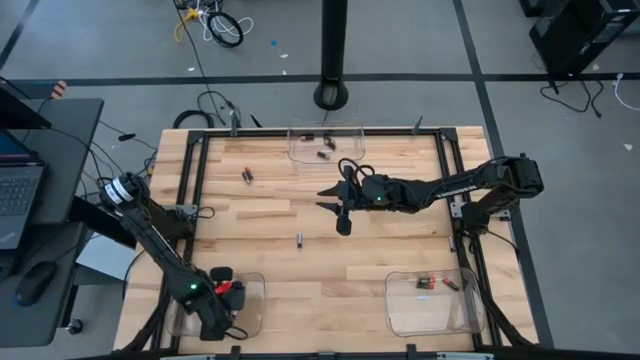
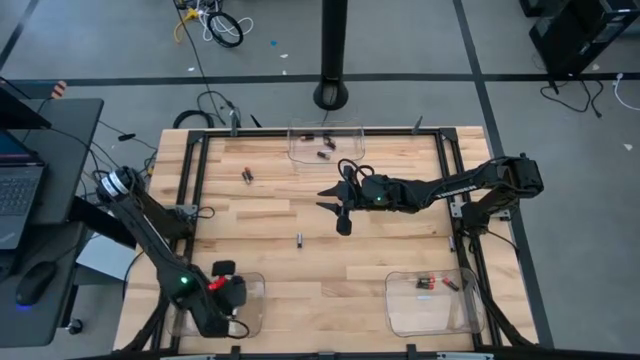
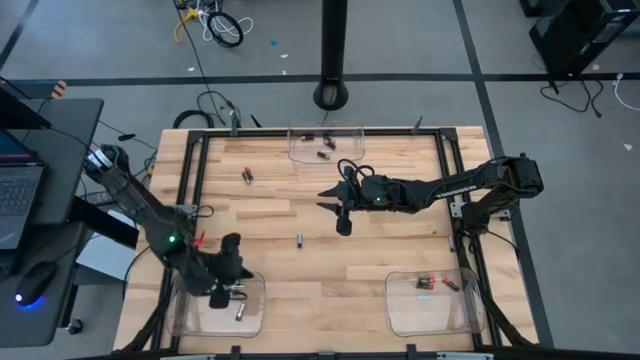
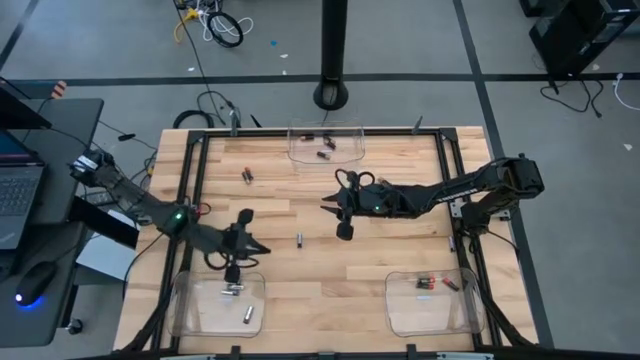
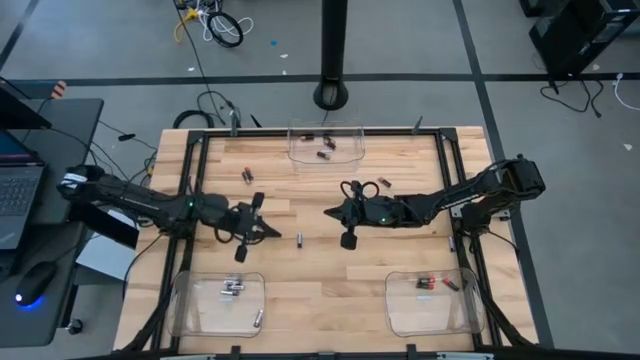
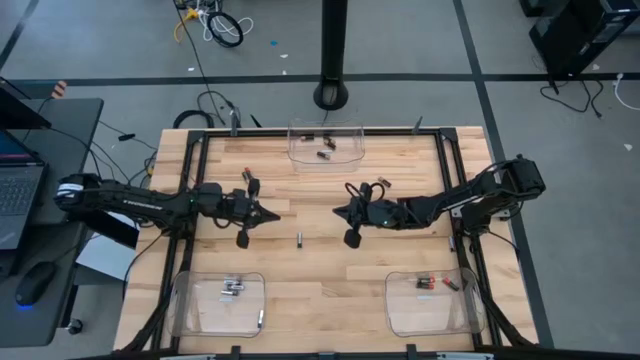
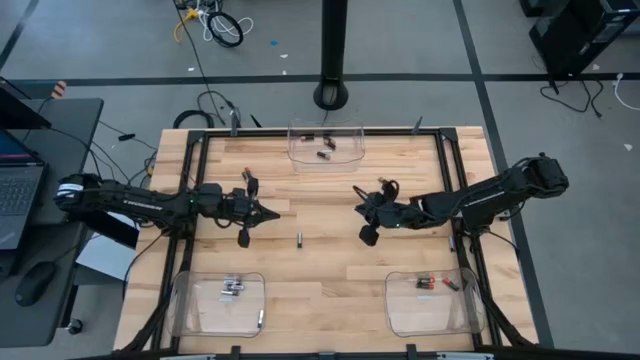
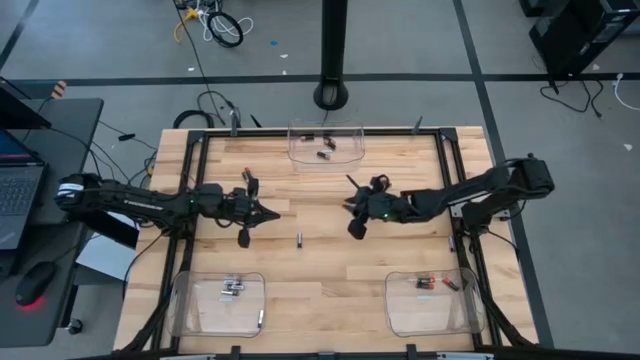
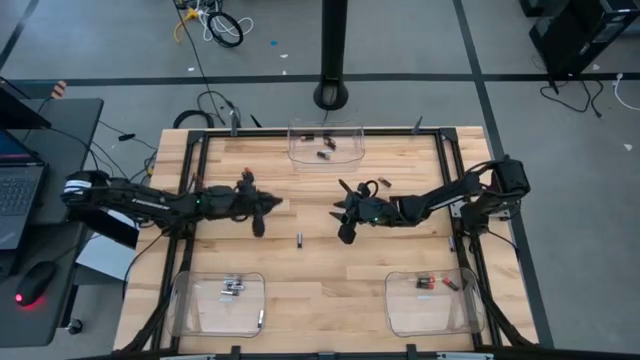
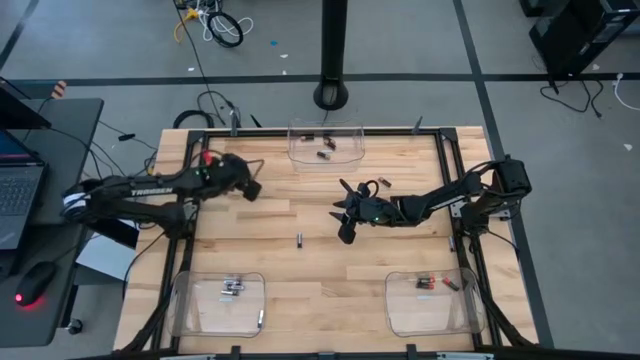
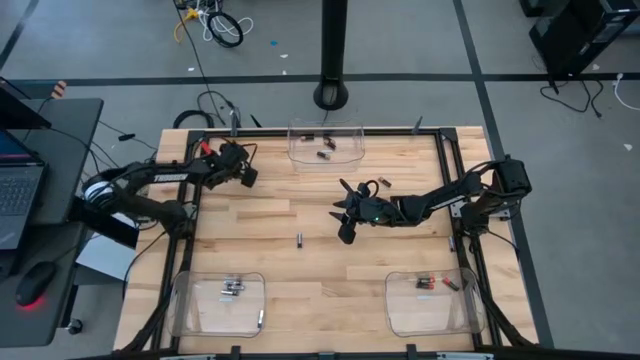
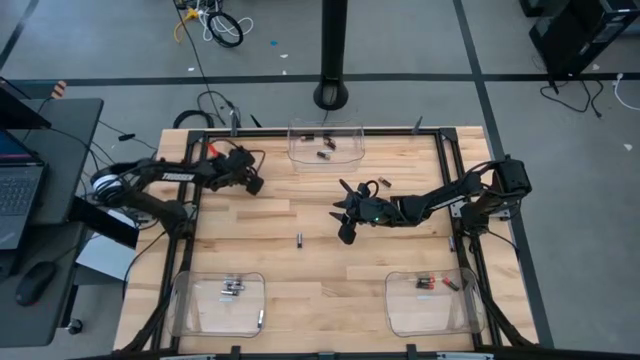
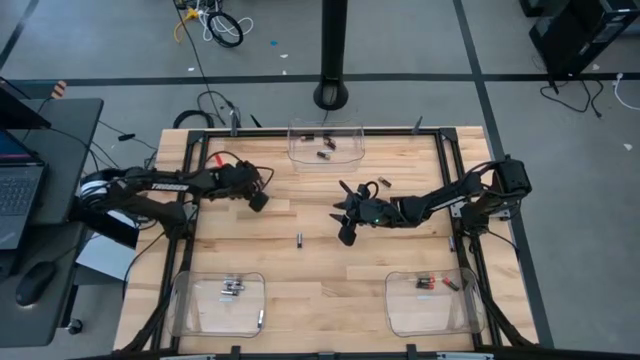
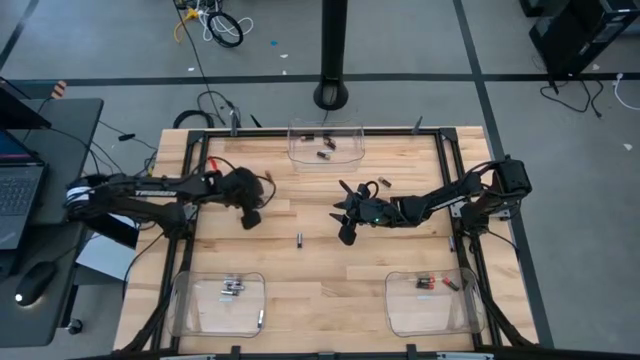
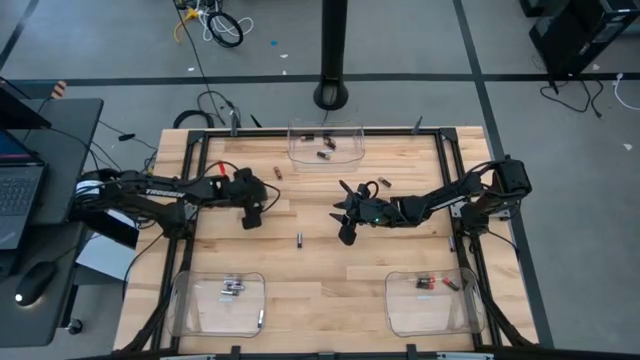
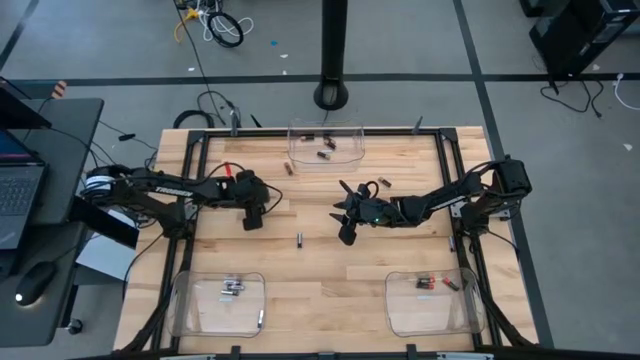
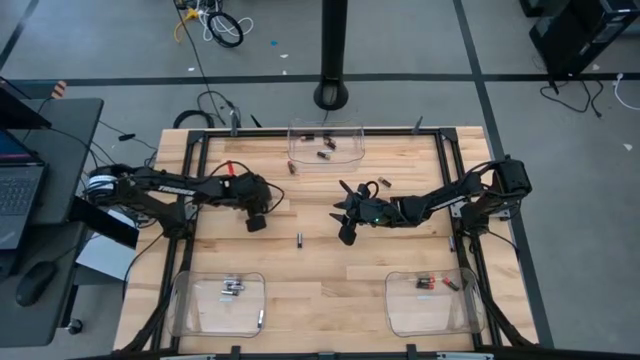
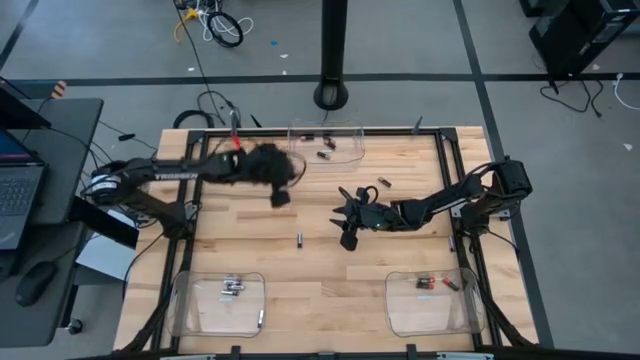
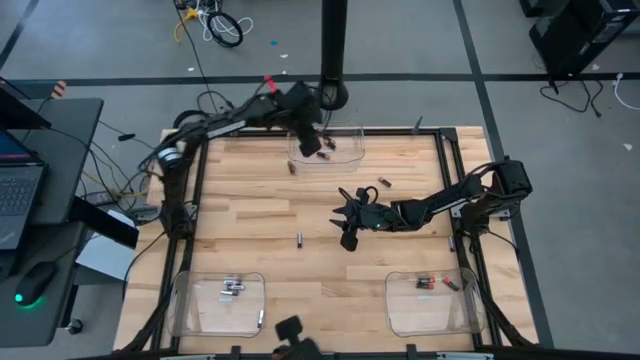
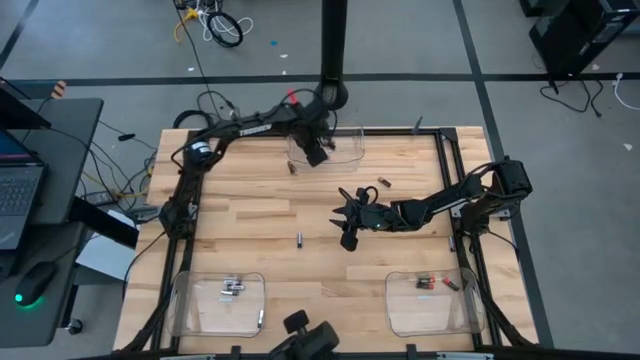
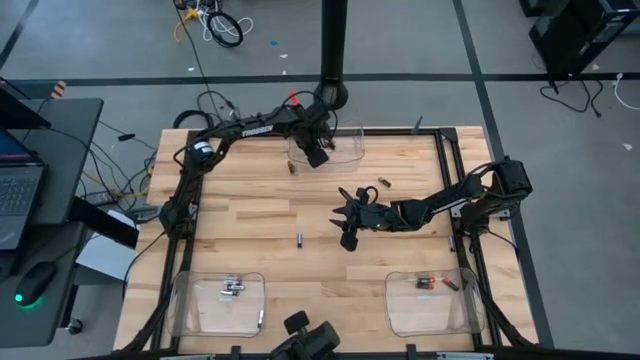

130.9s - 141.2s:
Task: Sort batteries
Put the brown battery into the top middle transparent bin

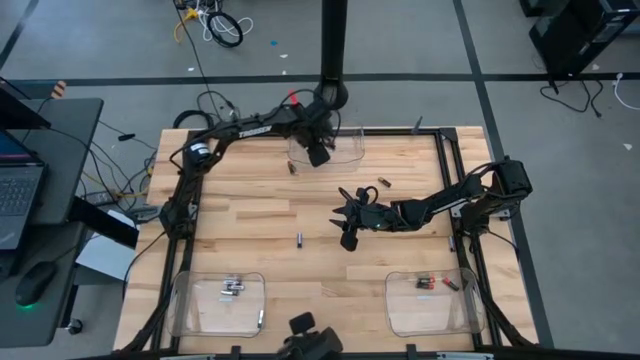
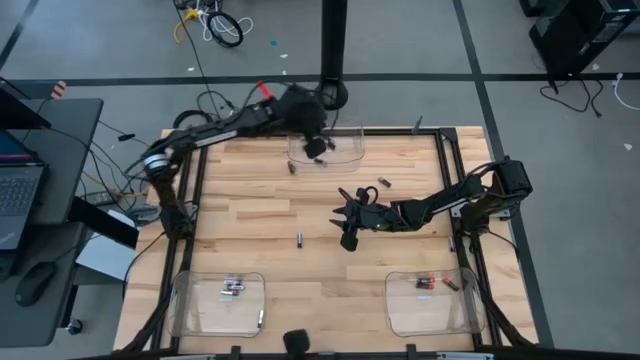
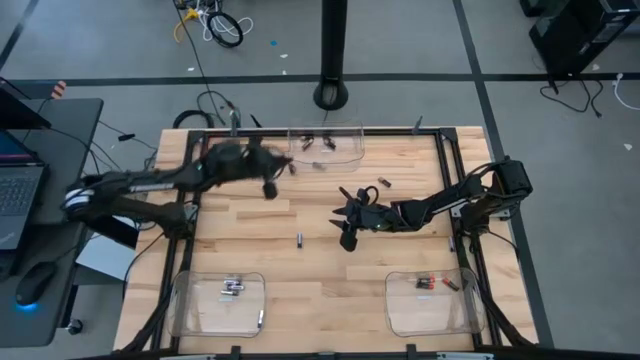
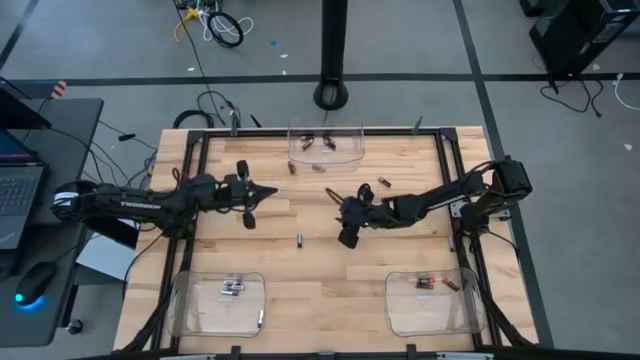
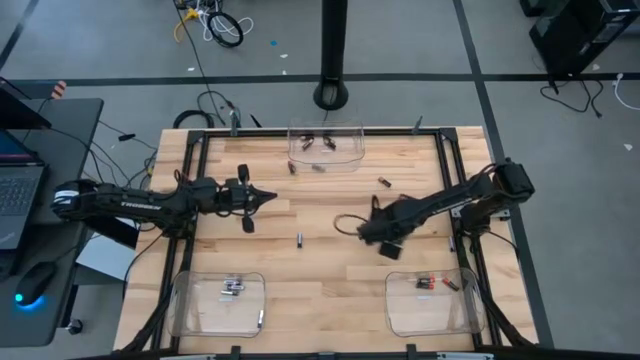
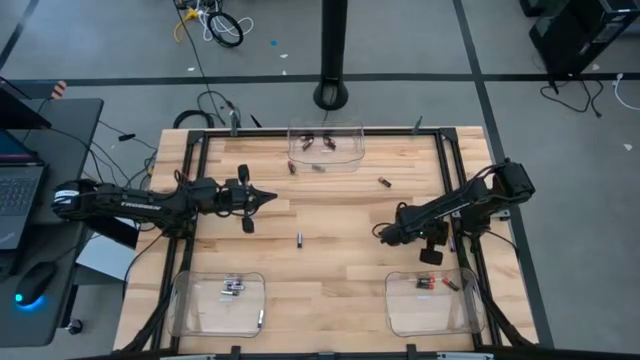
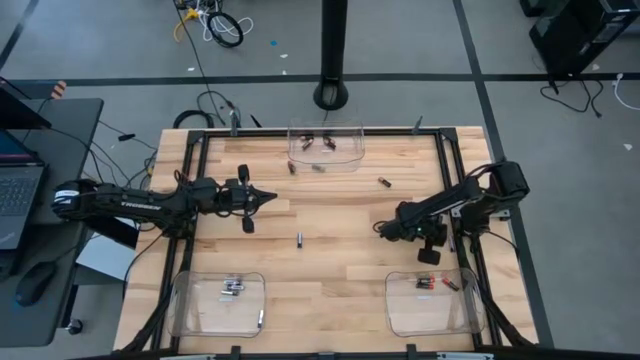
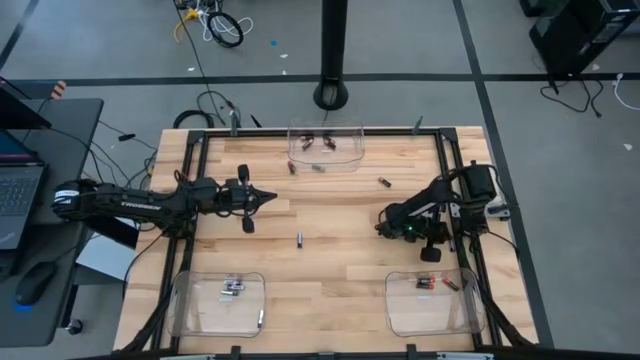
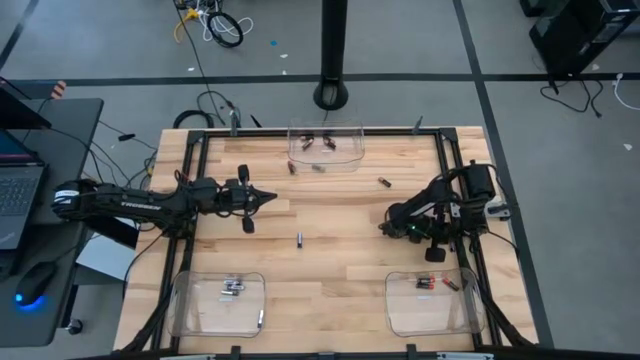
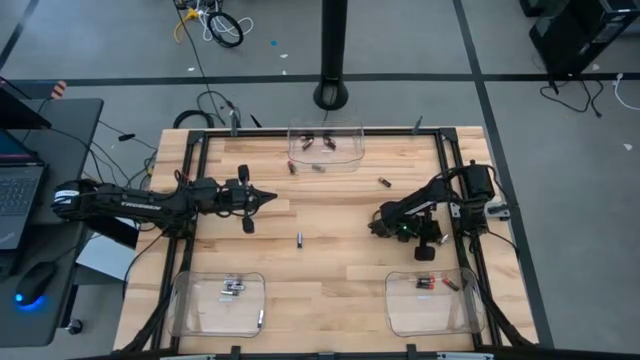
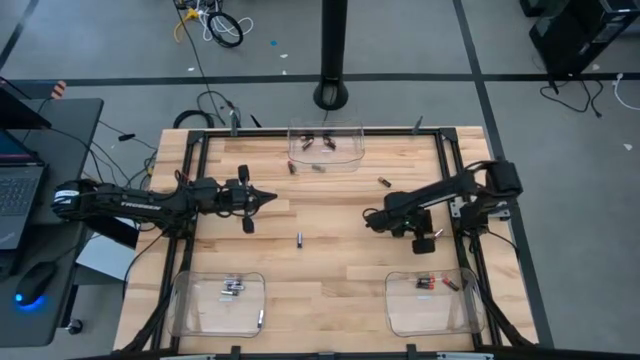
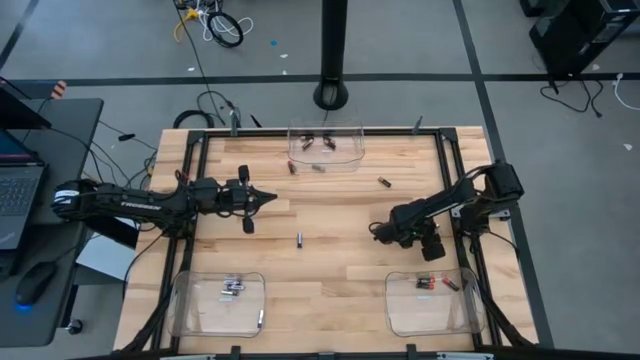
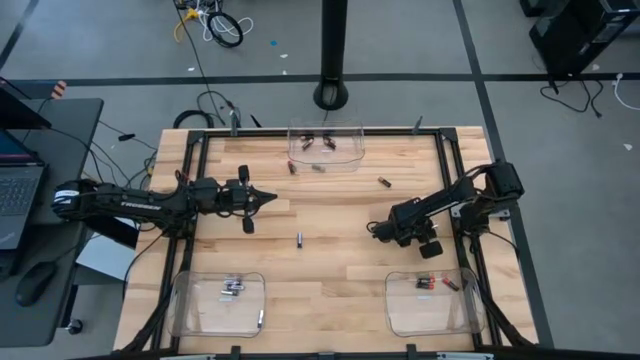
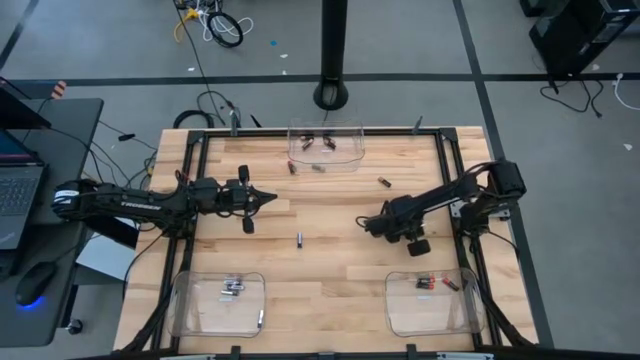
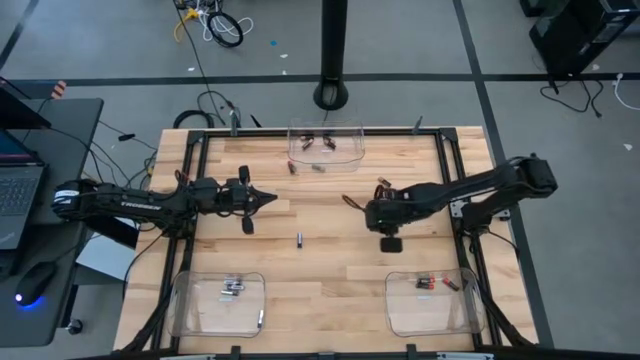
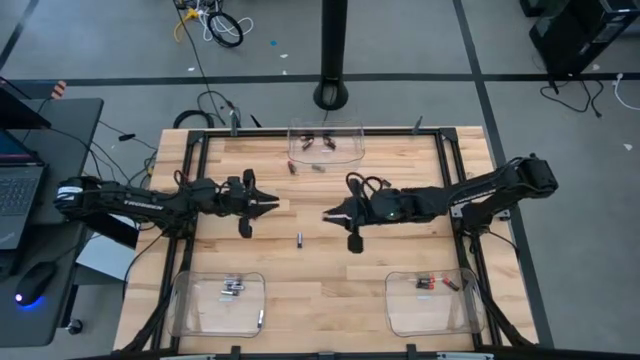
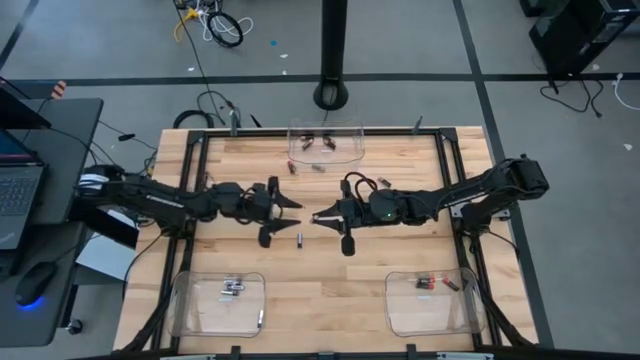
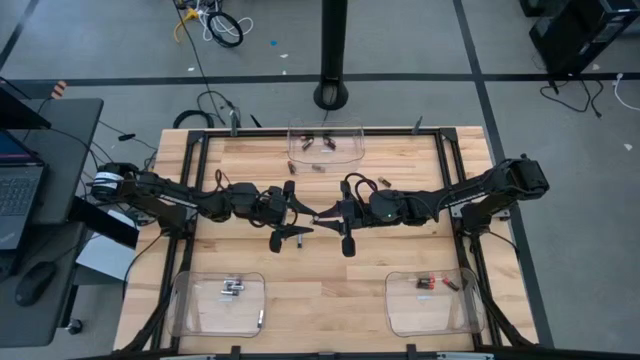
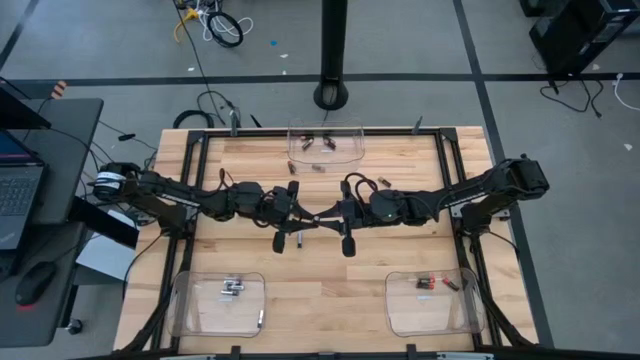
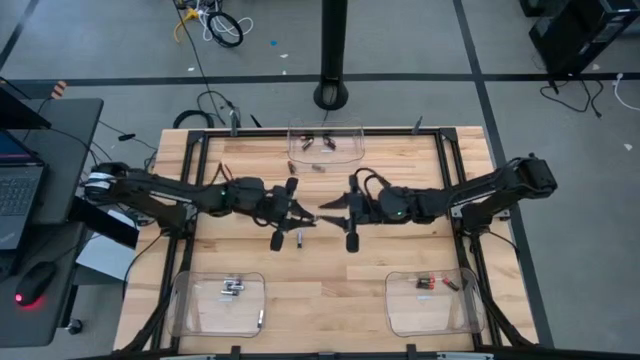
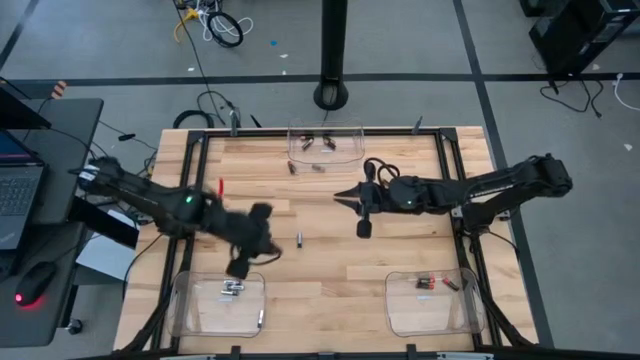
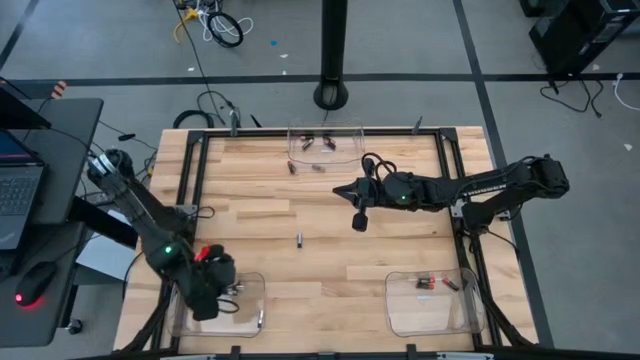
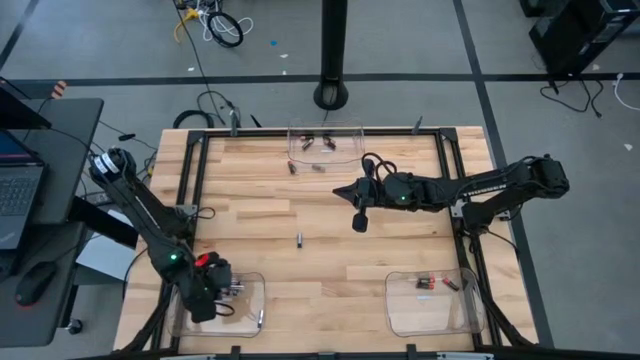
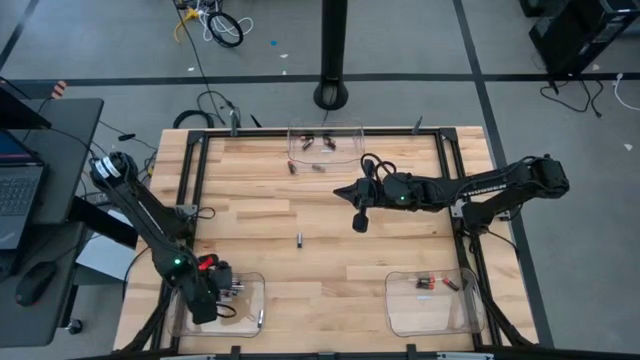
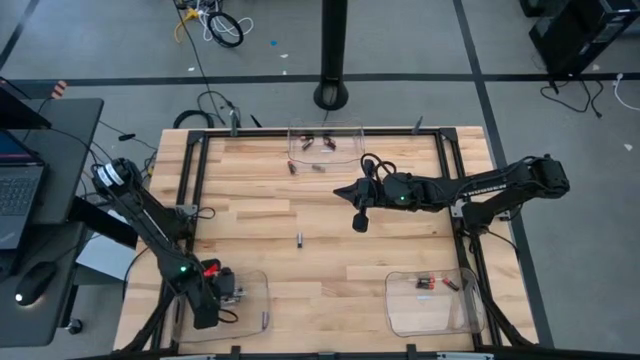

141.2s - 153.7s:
Put the silver battery into the bottom left transparent bin
